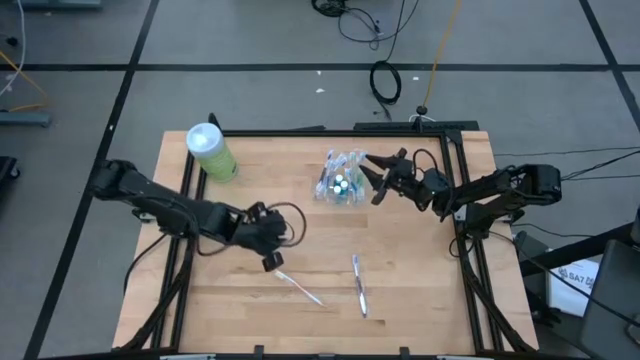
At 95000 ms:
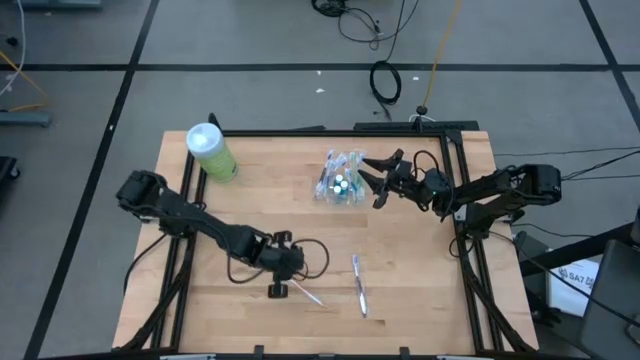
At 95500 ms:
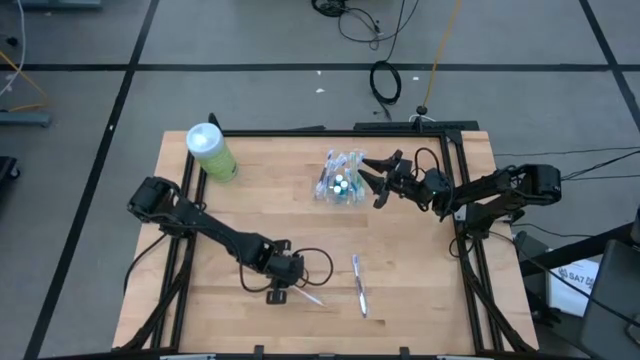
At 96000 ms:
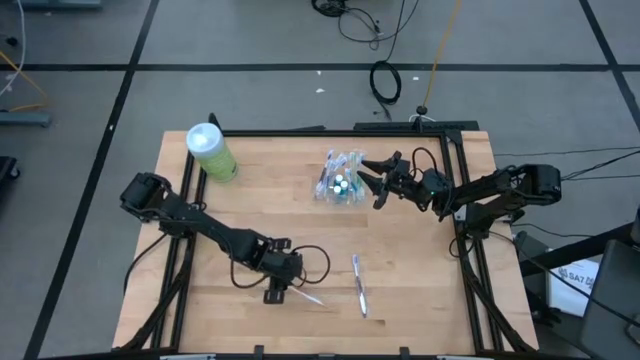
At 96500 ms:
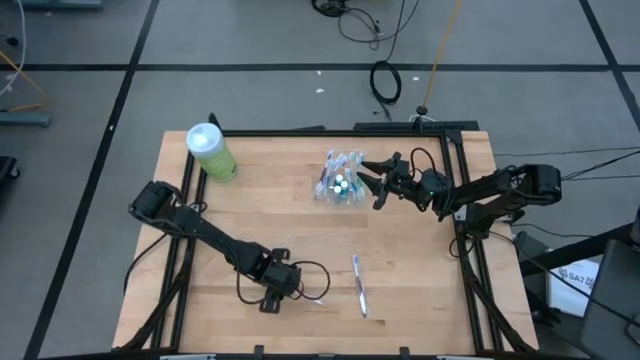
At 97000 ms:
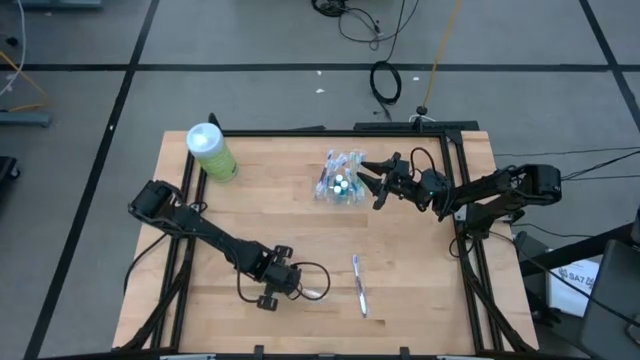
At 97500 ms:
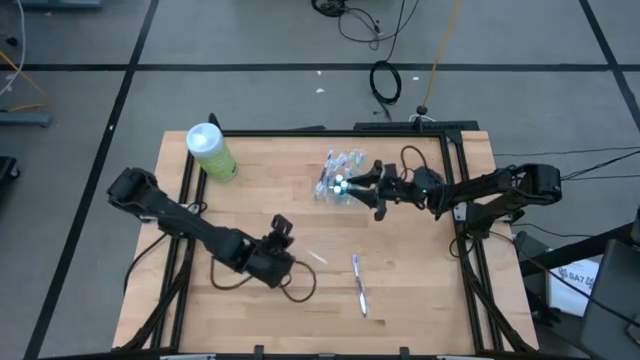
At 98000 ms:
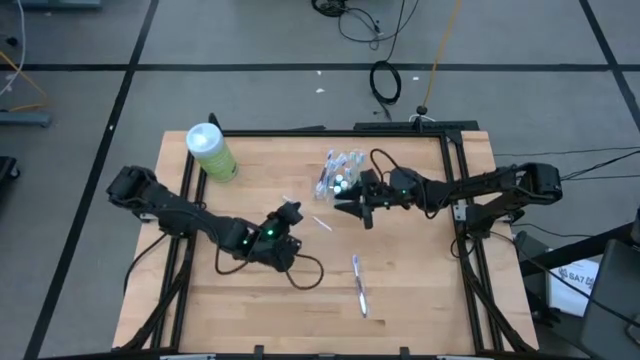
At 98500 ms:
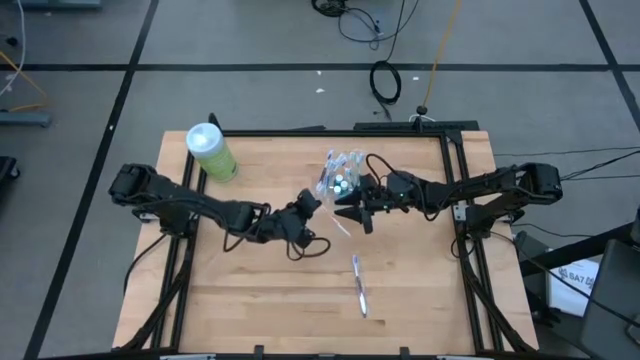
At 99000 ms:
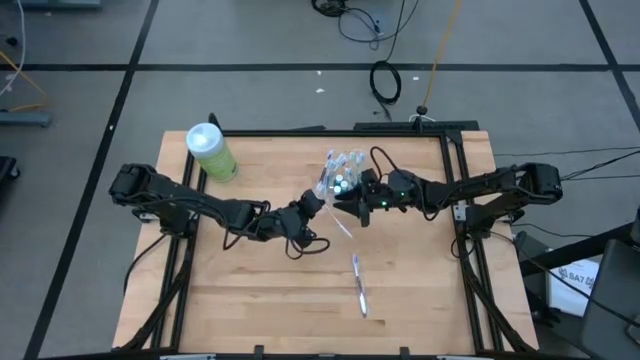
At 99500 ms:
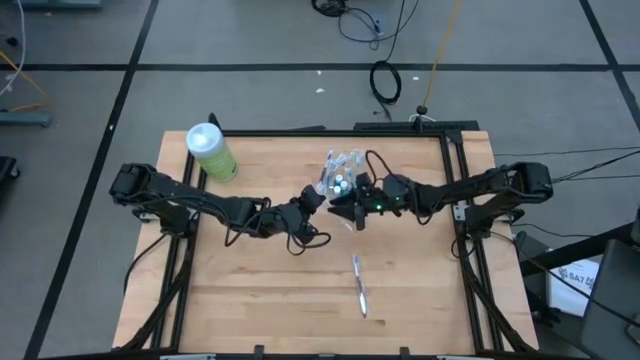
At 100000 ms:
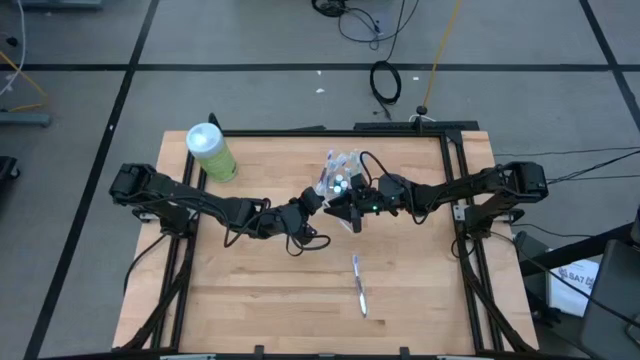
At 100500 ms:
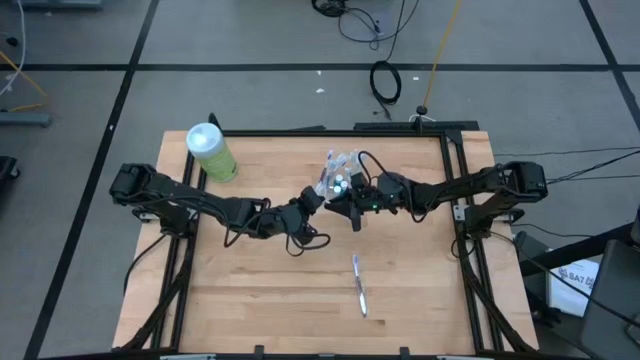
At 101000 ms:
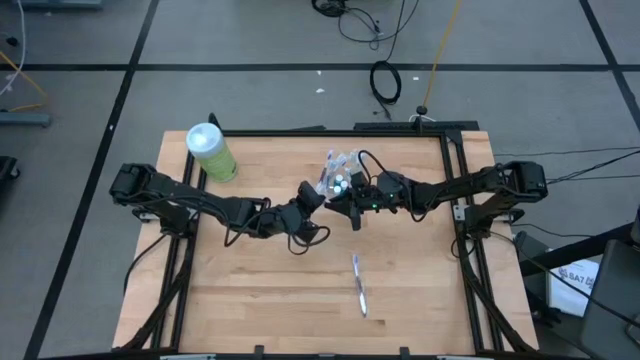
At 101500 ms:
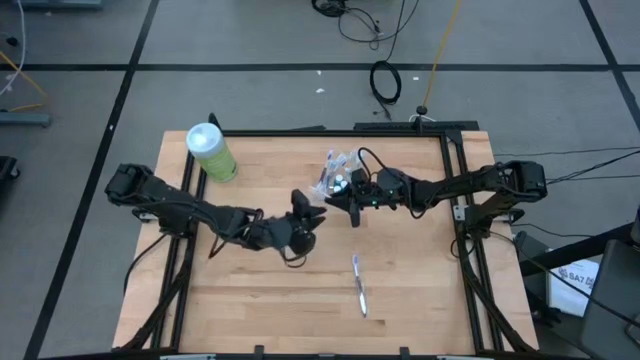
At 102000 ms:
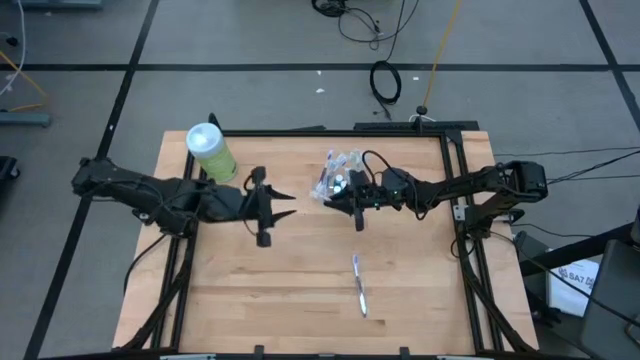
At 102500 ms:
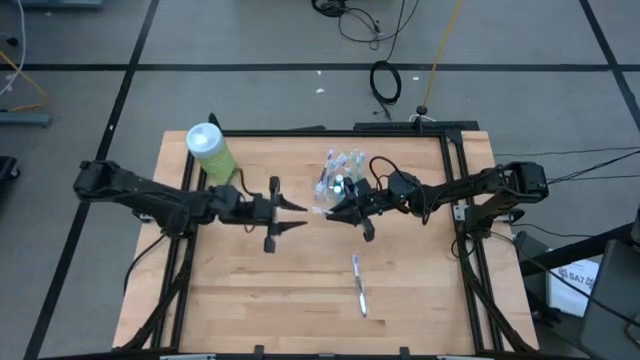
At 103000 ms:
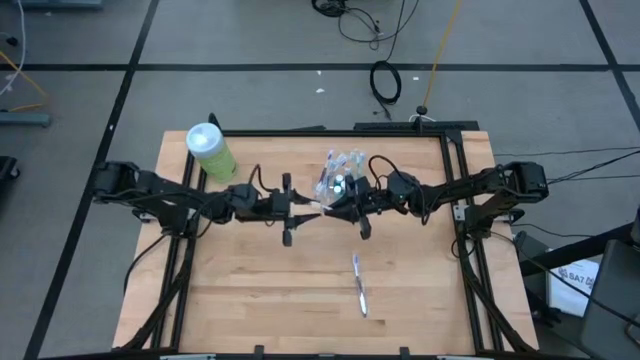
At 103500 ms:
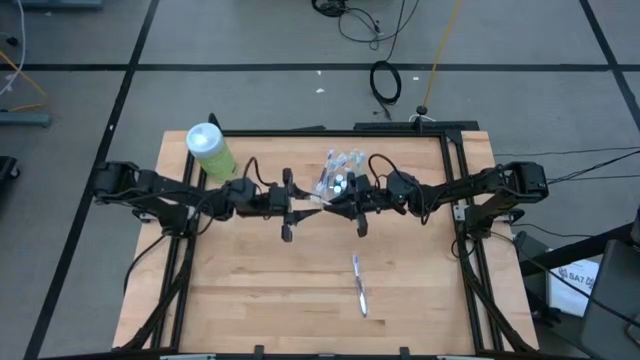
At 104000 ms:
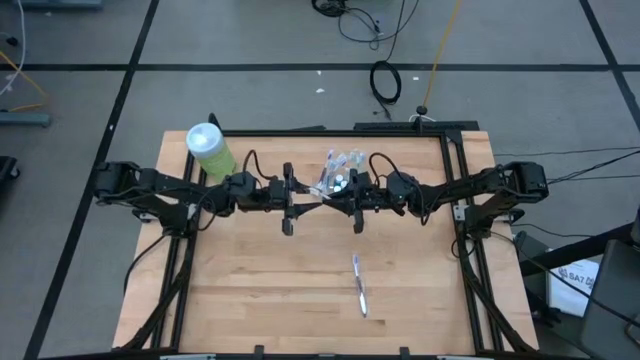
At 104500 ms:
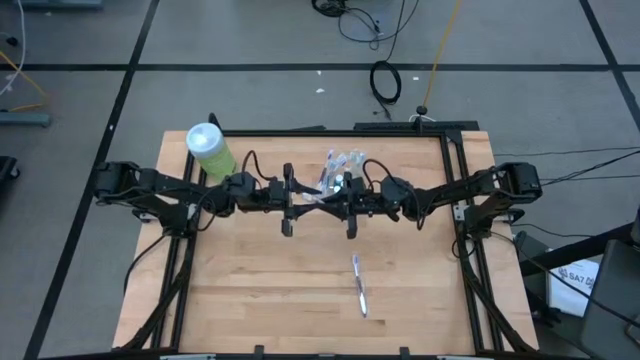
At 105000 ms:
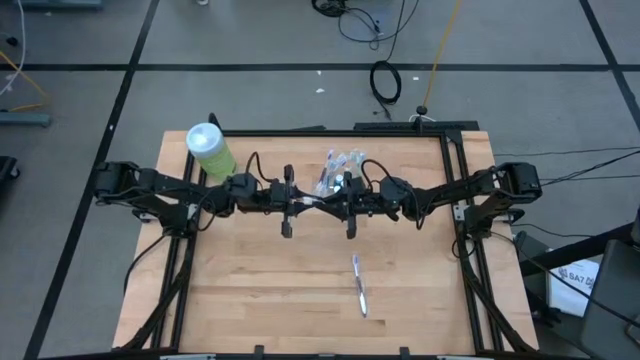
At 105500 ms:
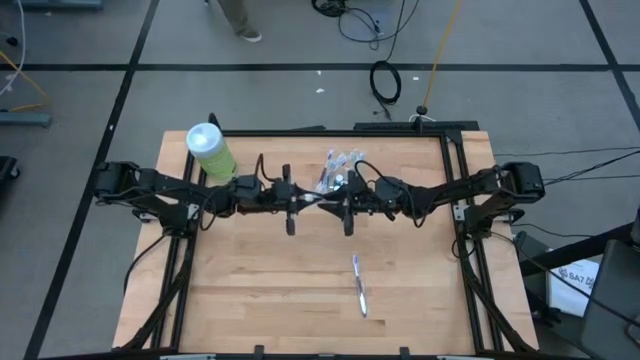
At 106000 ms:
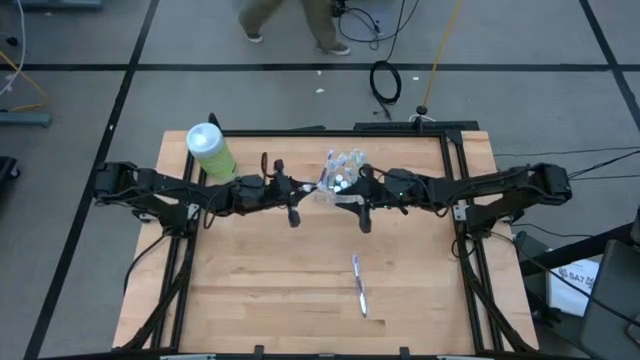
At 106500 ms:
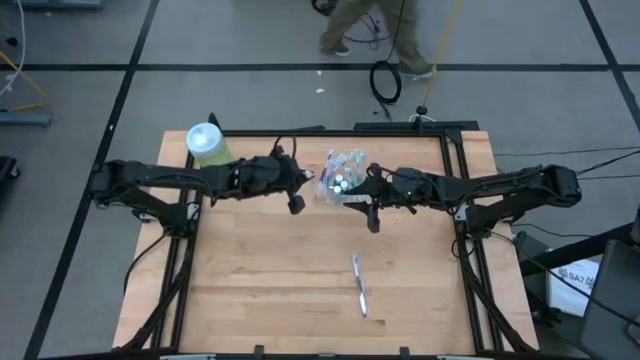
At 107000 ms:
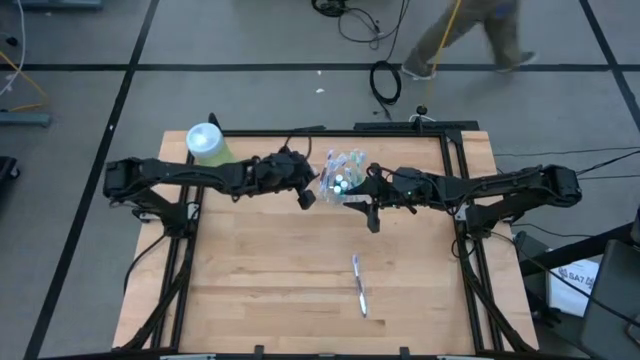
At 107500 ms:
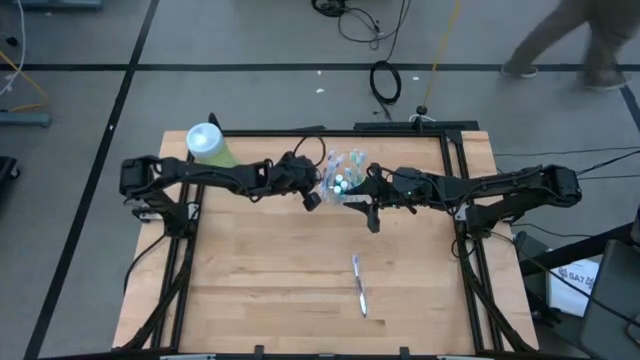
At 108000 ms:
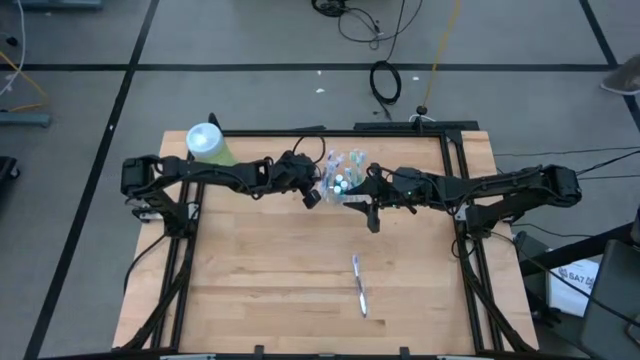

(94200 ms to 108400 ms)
Task: Pick & Place toothbrushing station
Put the orange toothbrush into the transparent organizer

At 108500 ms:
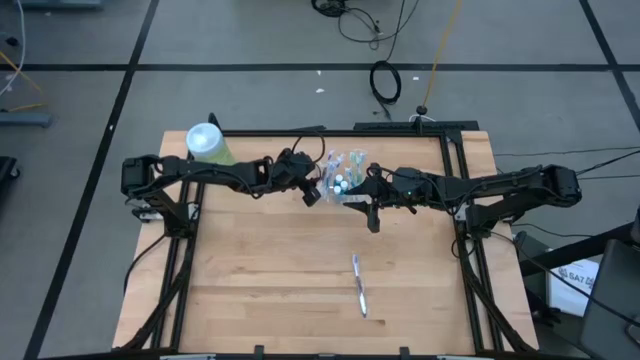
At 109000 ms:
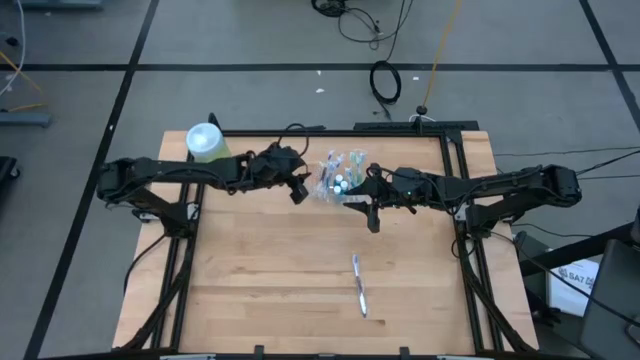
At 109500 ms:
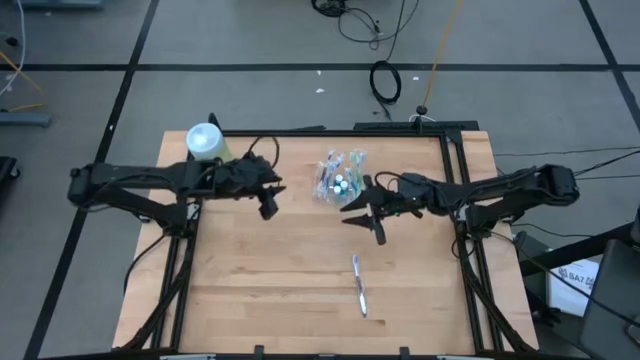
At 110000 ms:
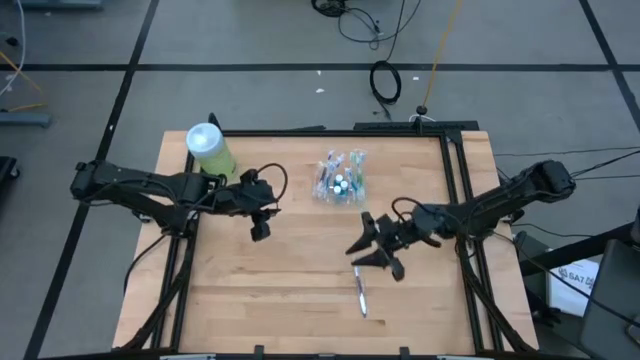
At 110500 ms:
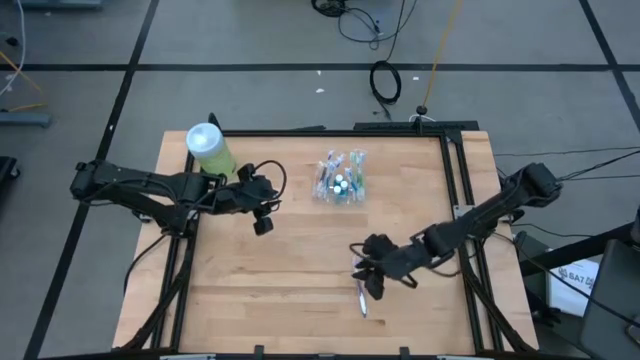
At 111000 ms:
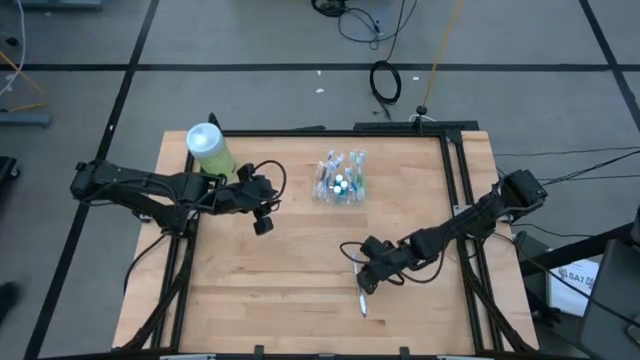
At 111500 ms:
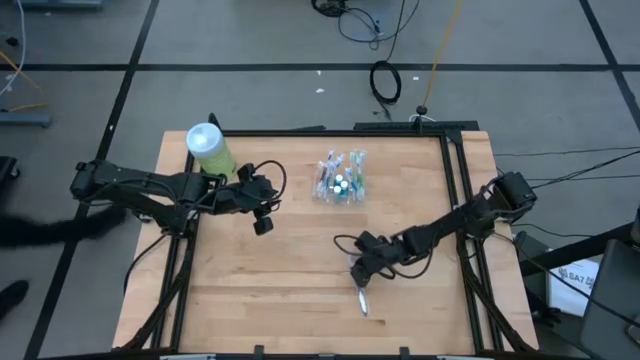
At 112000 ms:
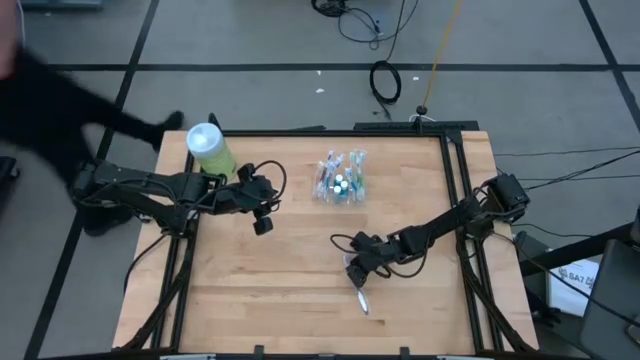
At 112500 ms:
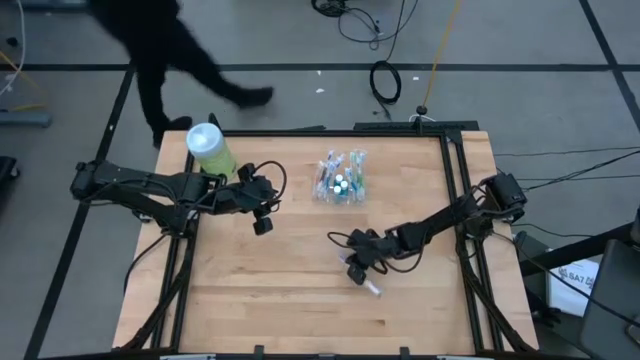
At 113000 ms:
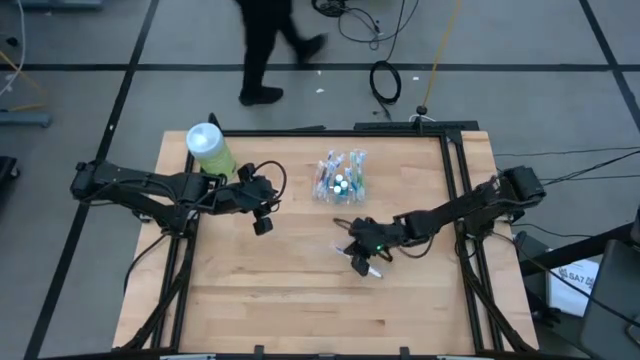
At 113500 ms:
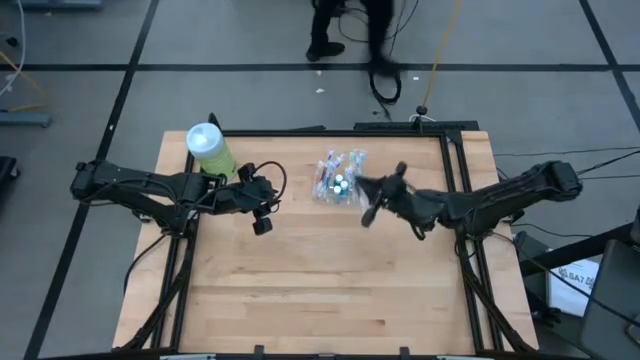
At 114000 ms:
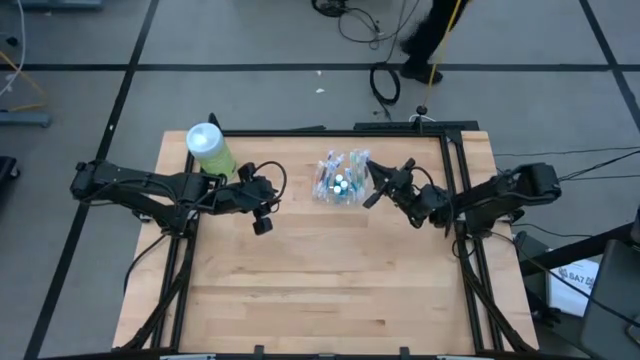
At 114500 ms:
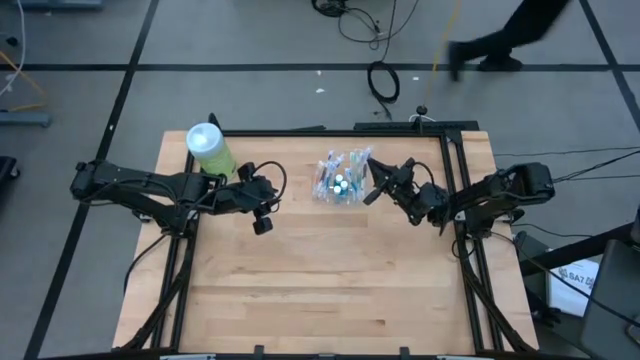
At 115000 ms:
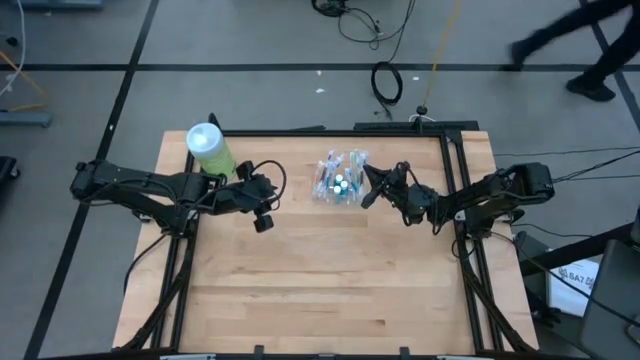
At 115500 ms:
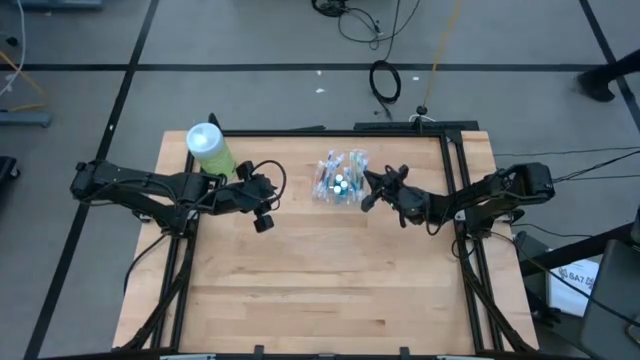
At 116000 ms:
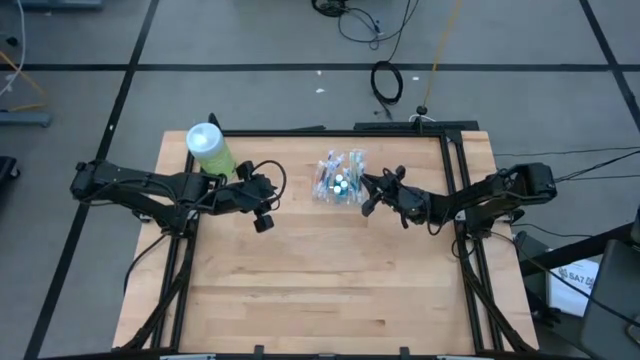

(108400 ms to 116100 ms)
Put the violet toothbrush into the transparent organizer

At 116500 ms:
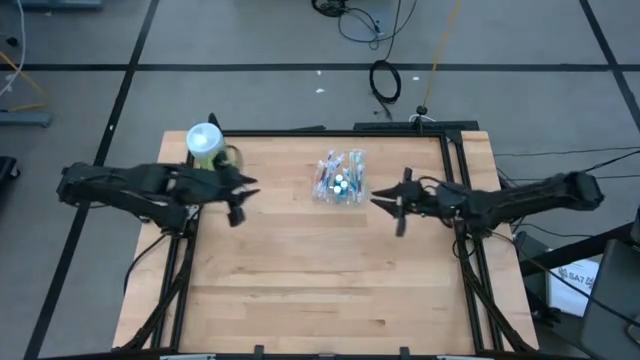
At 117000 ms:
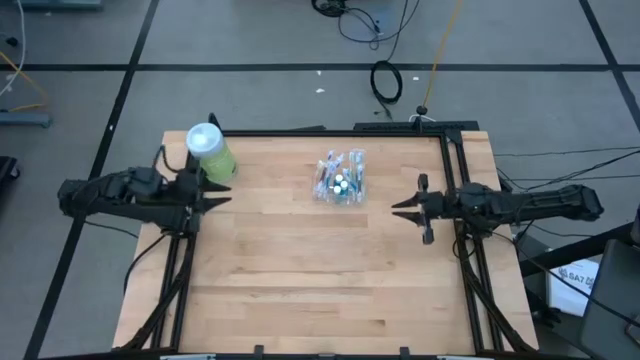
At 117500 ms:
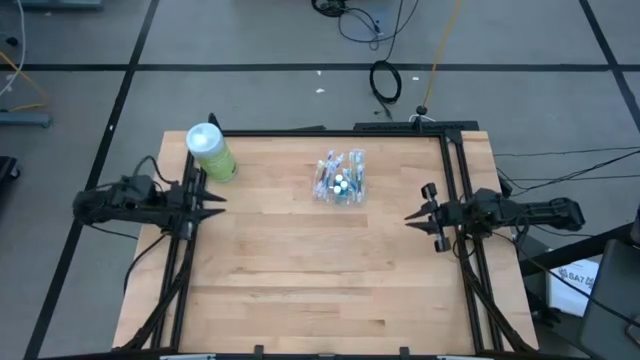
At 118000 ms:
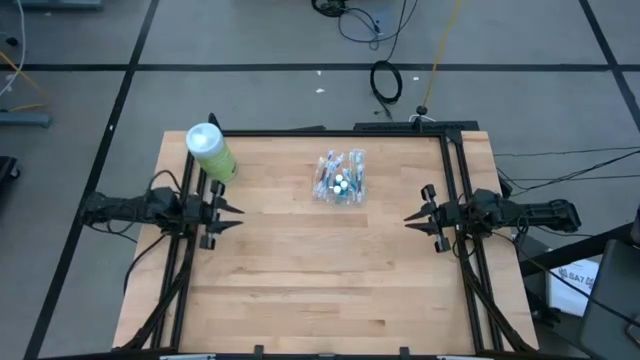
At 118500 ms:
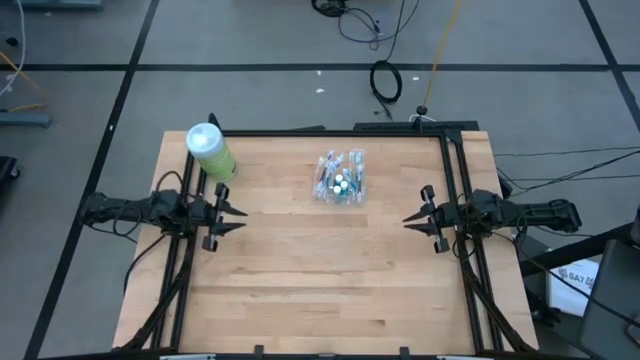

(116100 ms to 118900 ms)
Return to Home Position
